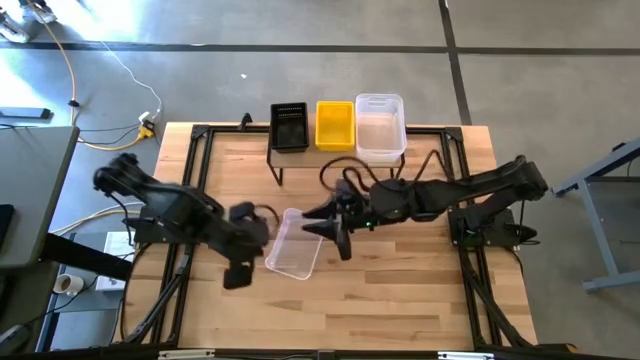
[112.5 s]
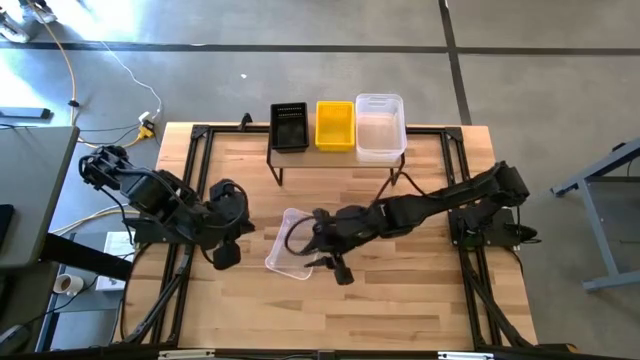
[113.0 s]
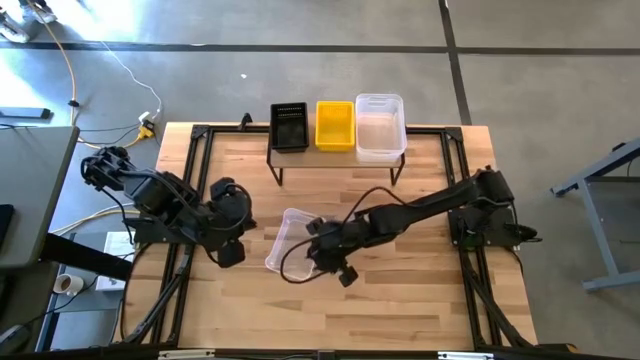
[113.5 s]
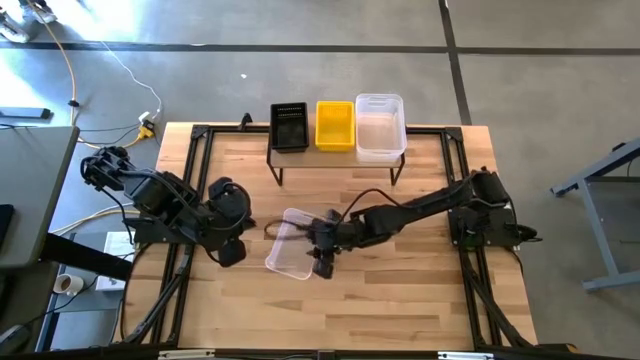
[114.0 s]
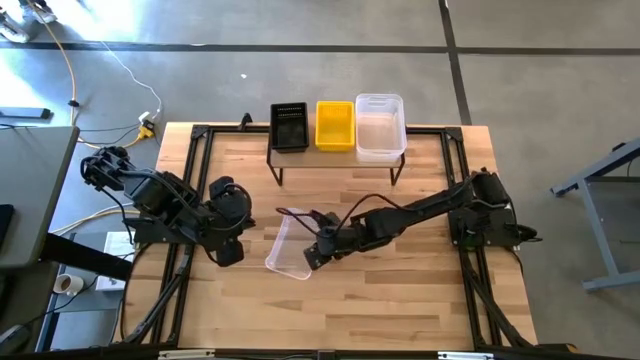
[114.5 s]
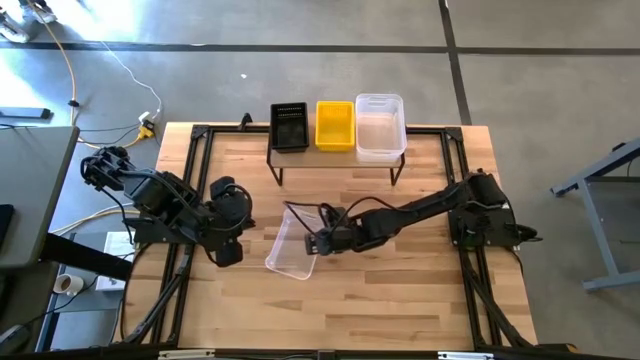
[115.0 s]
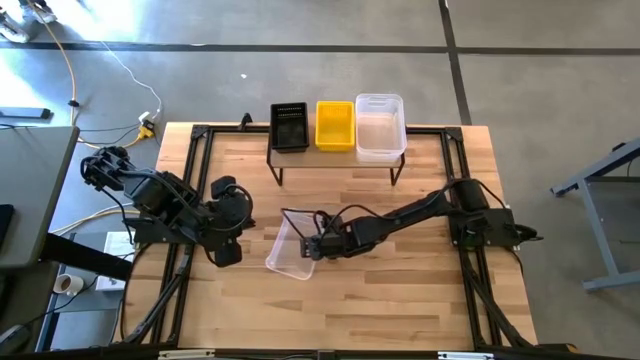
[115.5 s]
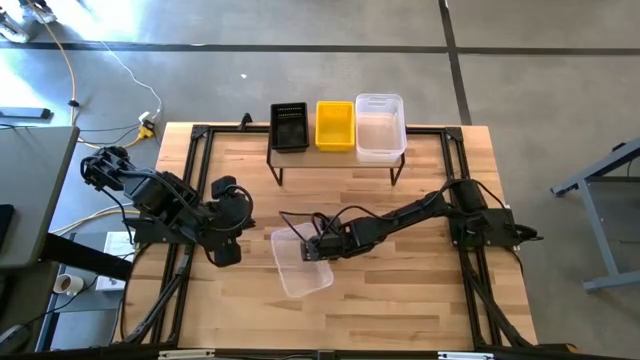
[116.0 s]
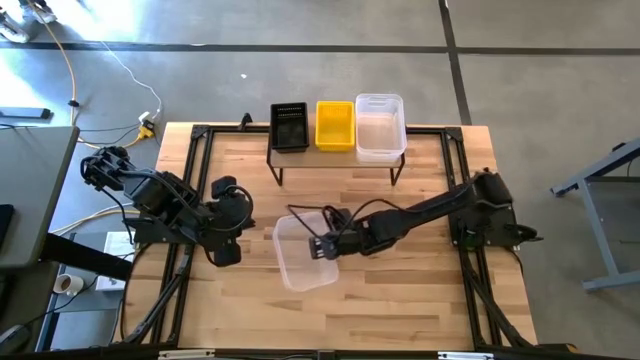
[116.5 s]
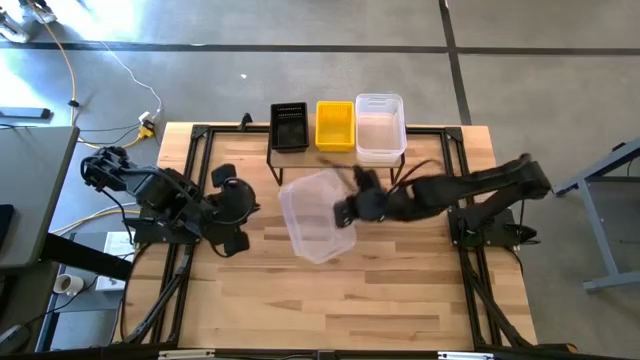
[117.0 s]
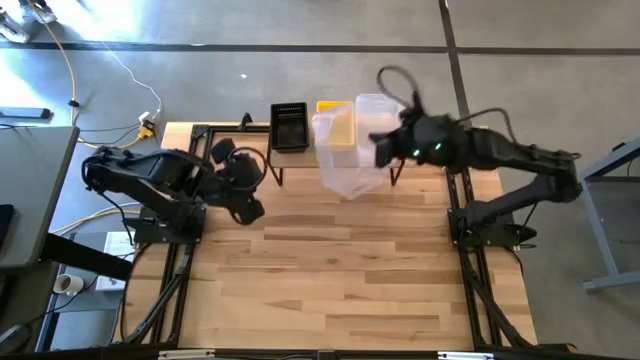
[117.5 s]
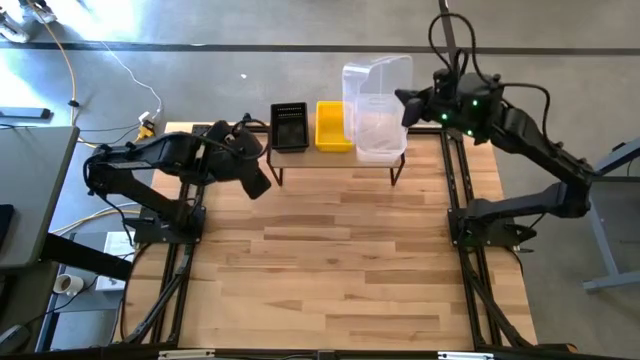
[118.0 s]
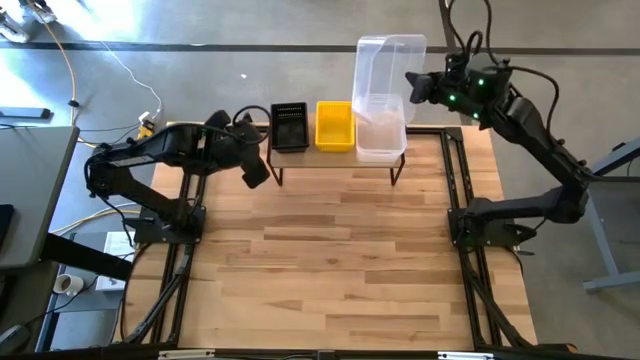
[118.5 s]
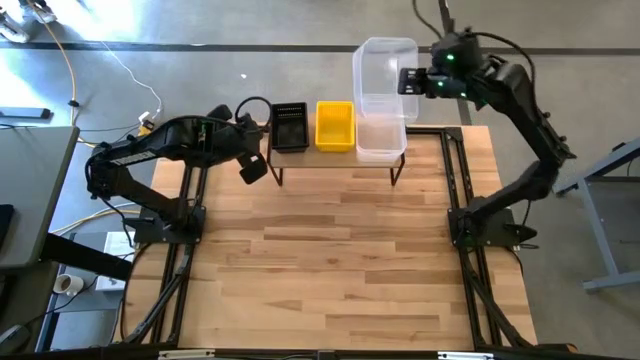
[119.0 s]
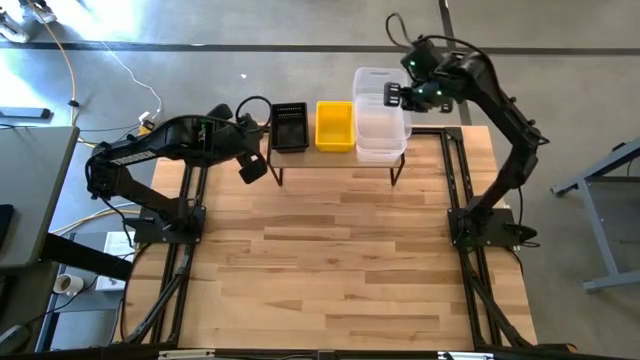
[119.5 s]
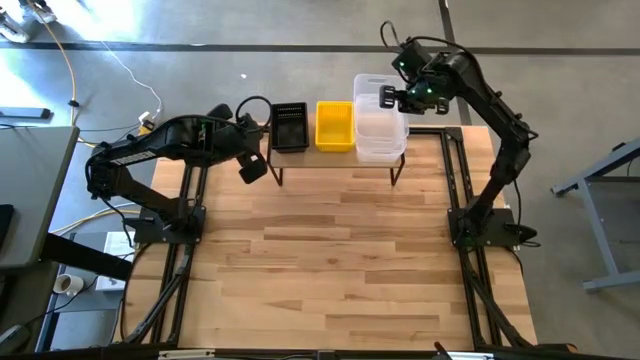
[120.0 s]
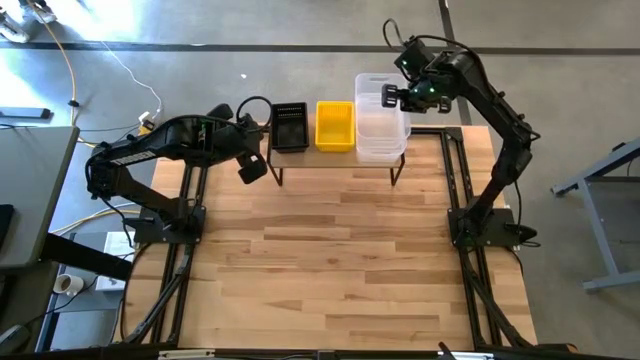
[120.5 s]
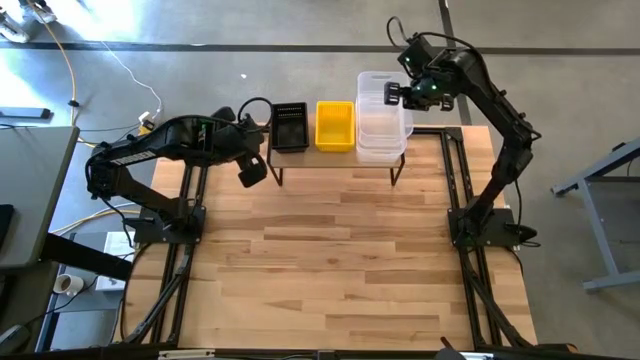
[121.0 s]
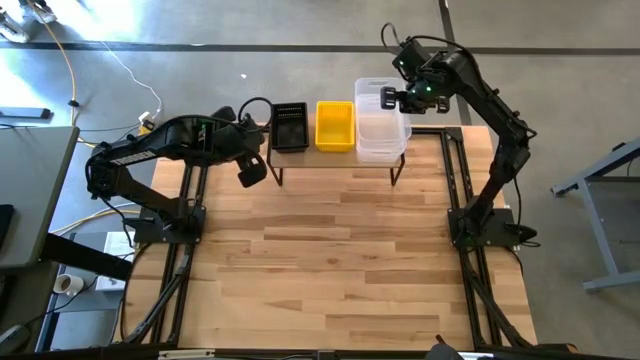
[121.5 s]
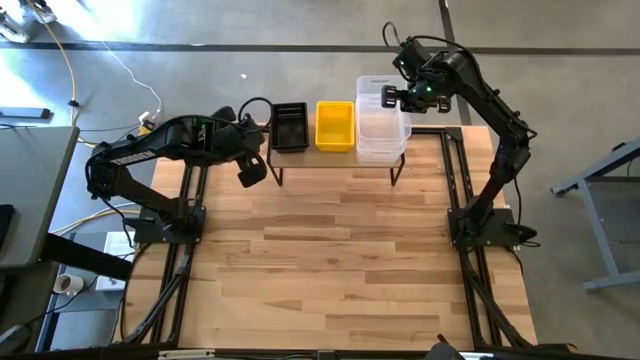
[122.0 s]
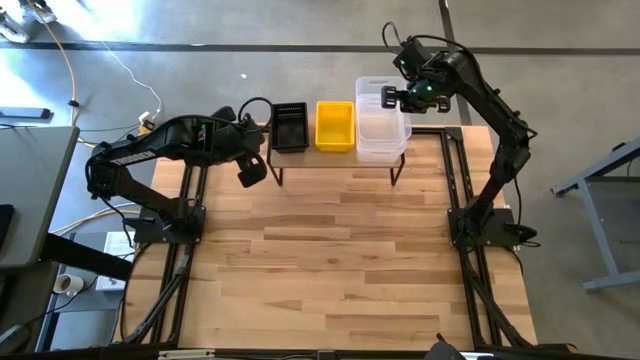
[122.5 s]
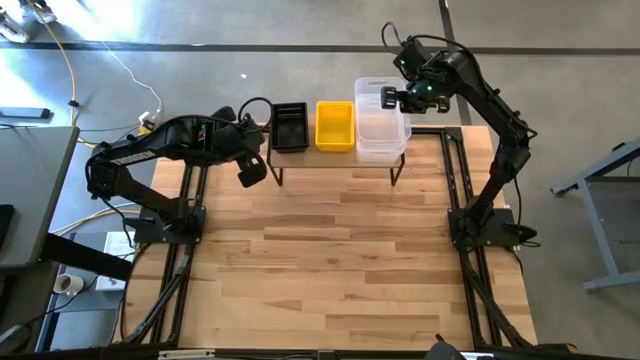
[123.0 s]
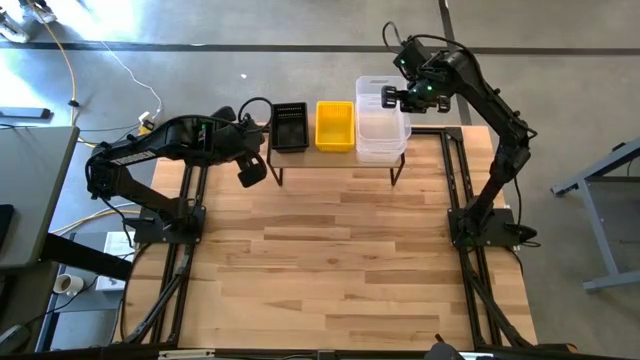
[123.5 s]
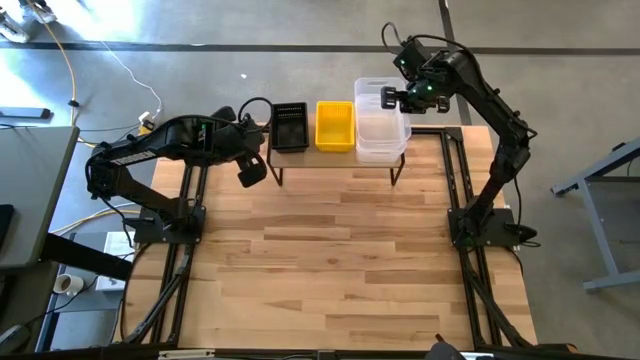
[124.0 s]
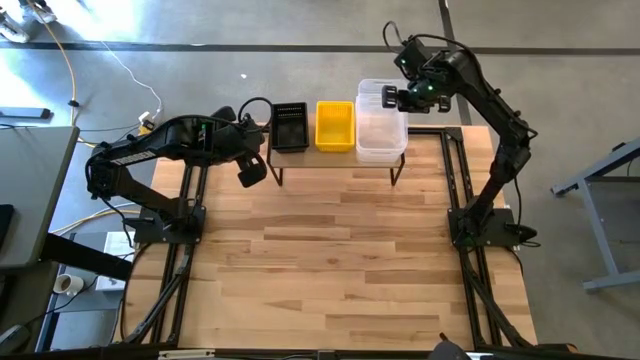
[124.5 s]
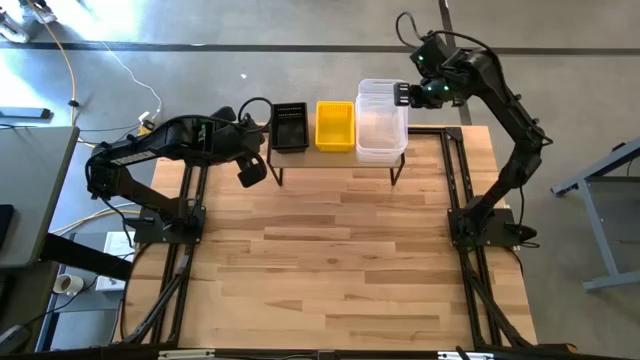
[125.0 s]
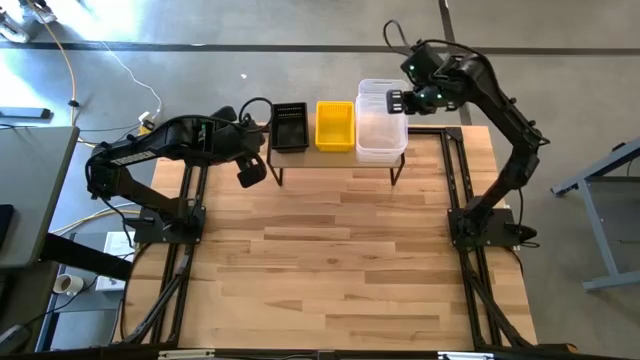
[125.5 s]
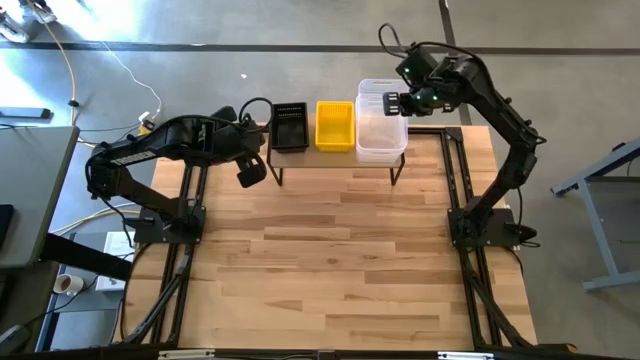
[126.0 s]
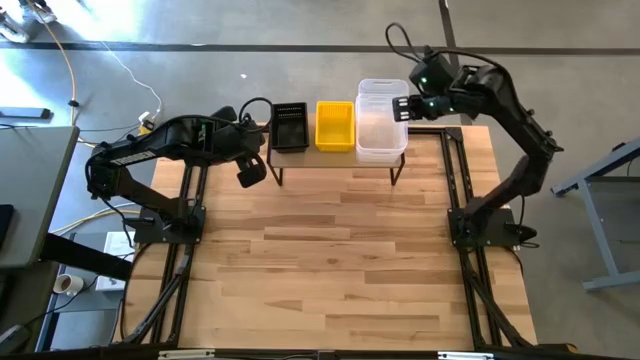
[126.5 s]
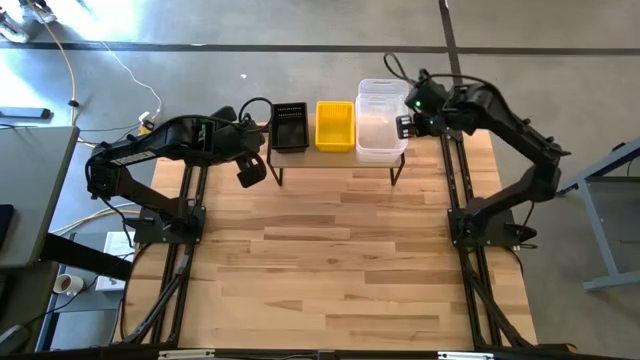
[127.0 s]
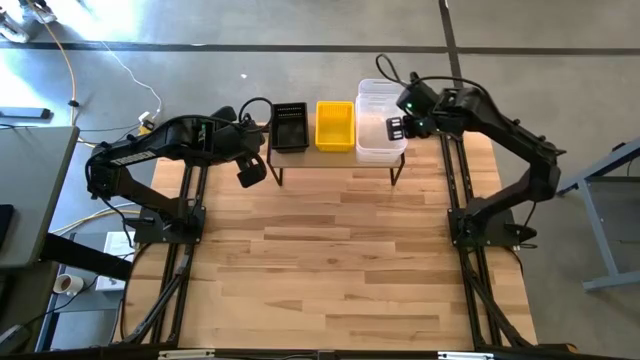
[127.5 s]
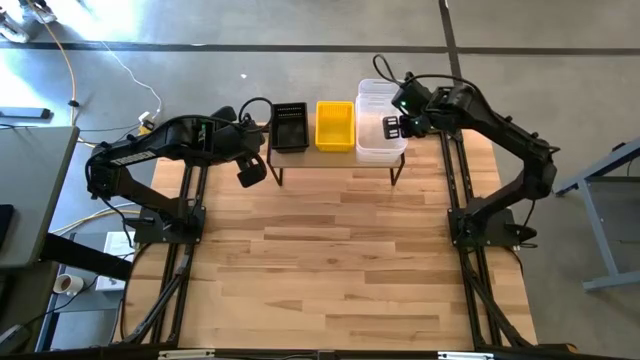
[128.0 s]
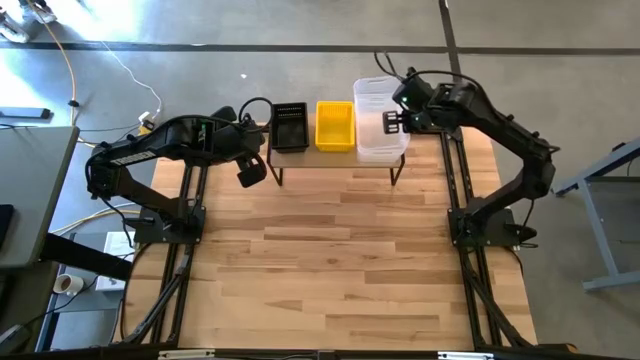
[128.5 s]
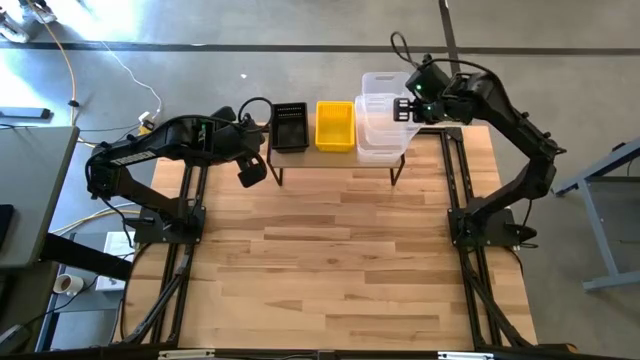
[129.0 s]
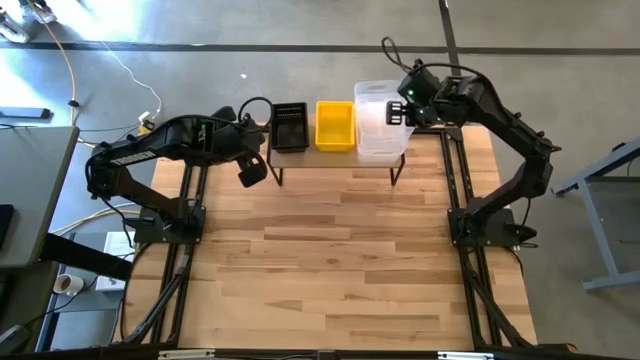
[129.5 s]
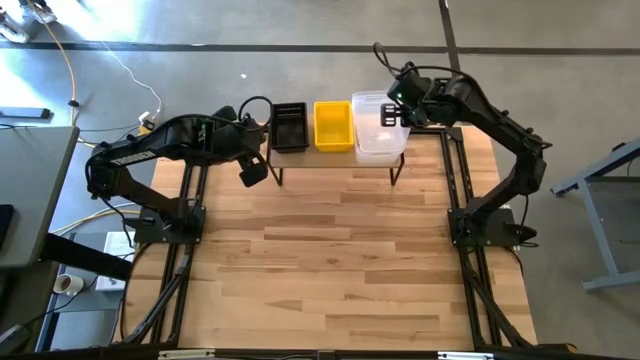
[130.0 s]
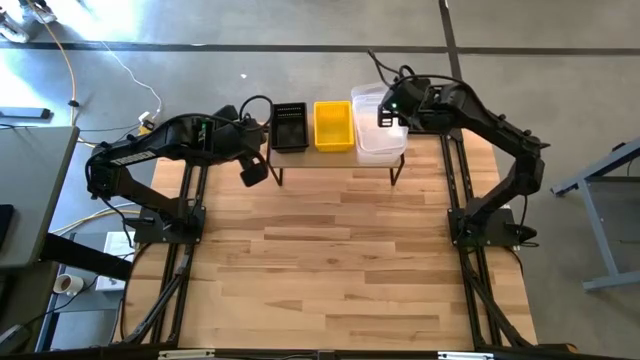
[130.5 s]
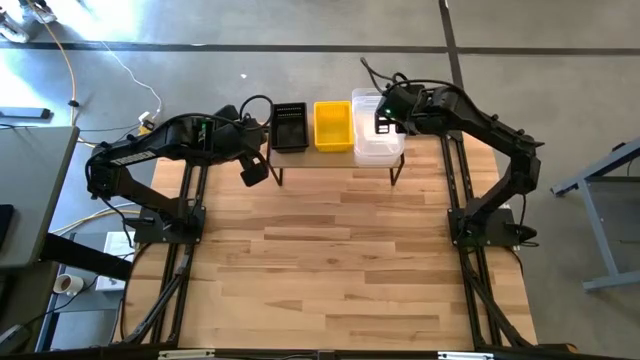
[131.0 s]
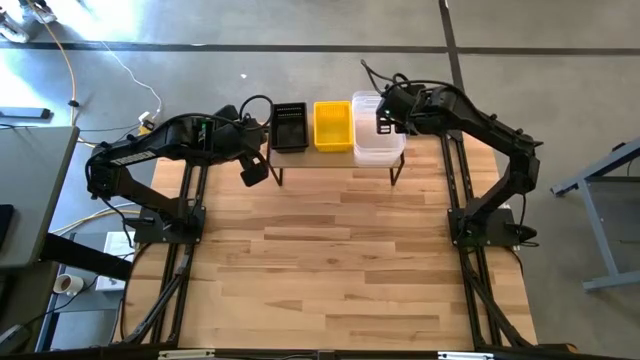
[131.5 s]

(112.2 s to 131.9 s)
Task: Stack baskets on shelf by color
Stack the transparent bin on top of the transparent bin on the shelf

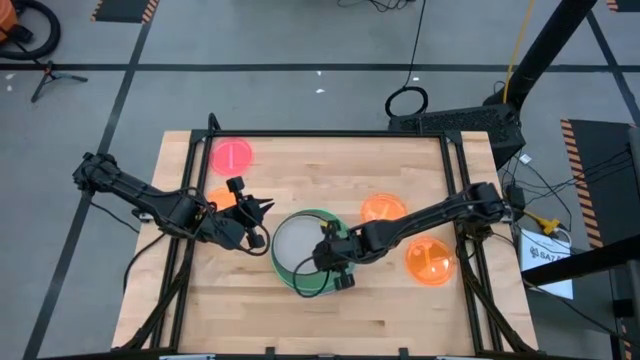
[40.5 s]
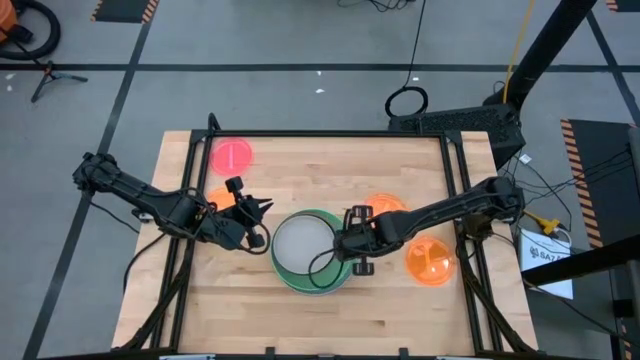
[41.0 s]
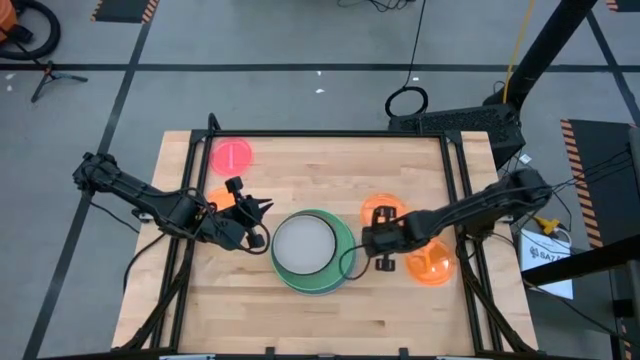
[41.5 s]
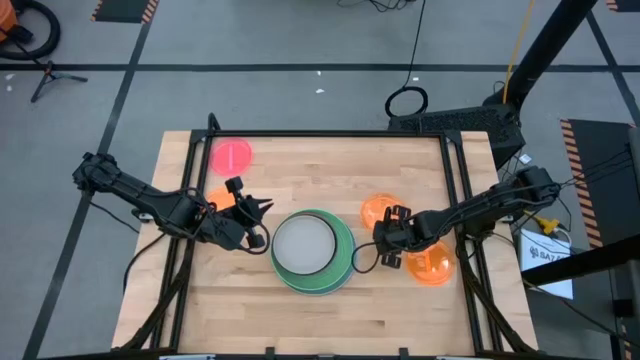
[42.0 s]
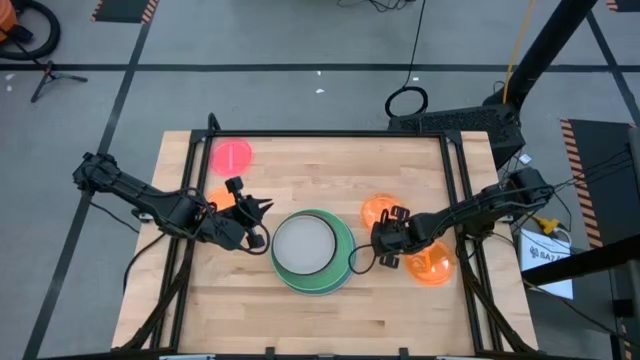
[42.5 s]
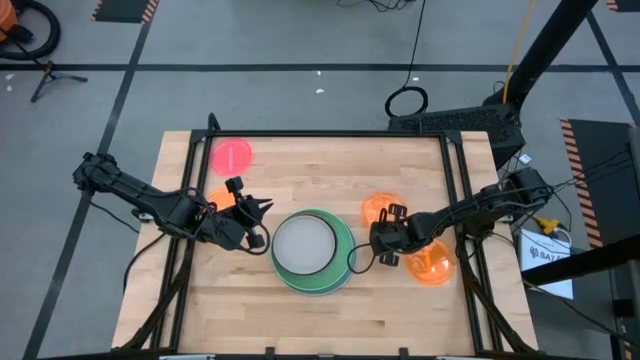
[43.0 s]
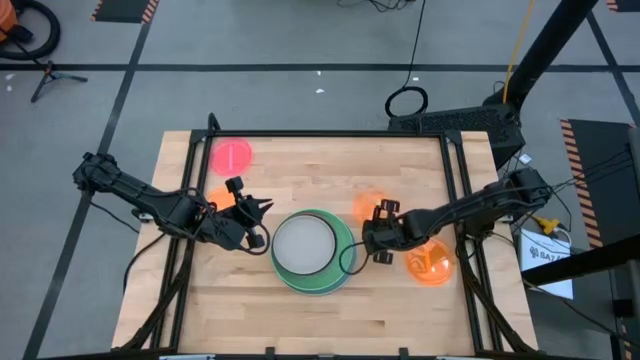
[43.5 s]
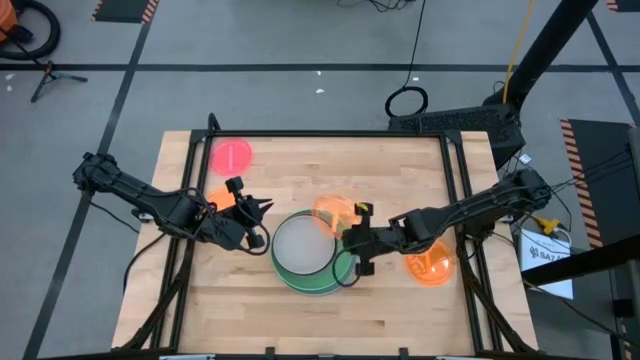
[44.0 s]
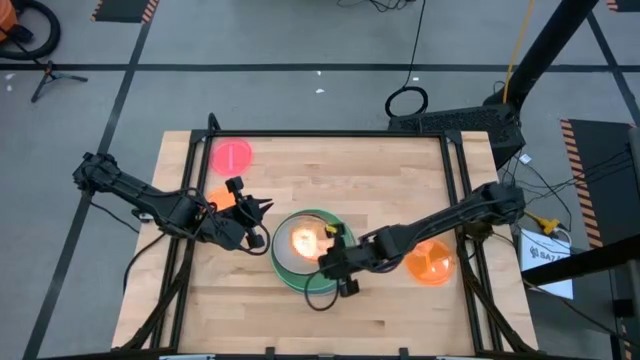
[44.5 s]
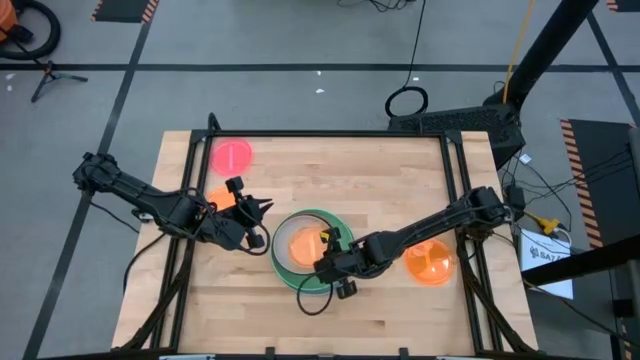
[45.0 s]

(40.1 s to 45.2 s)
Task: Stack plastic plates
Stack the top right orange plate on the gray plate
